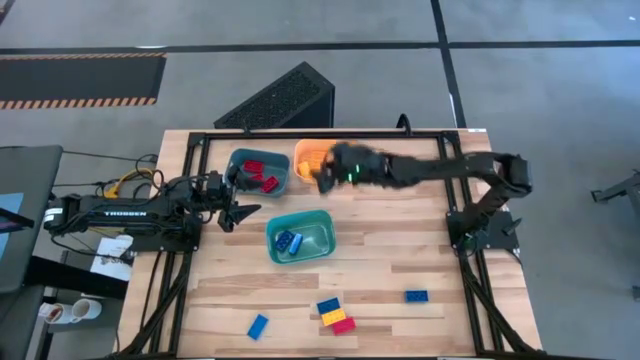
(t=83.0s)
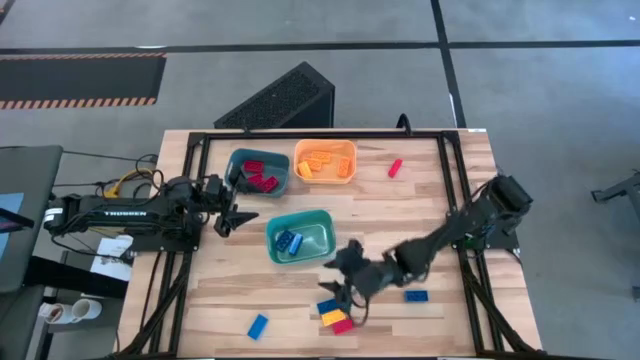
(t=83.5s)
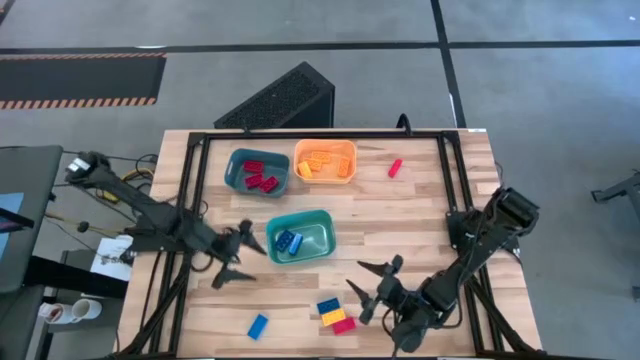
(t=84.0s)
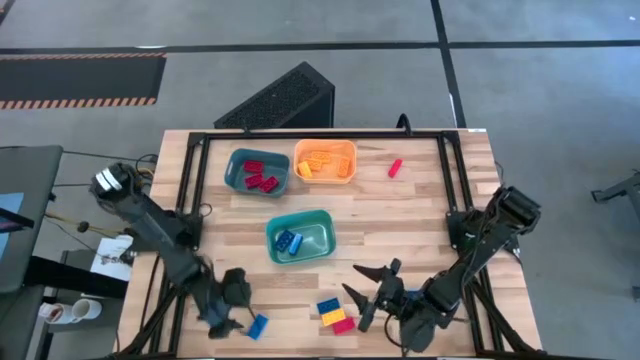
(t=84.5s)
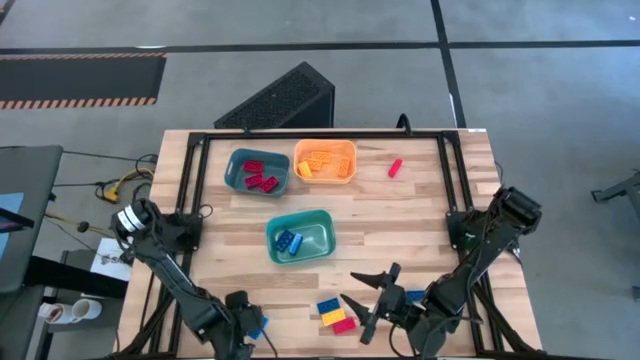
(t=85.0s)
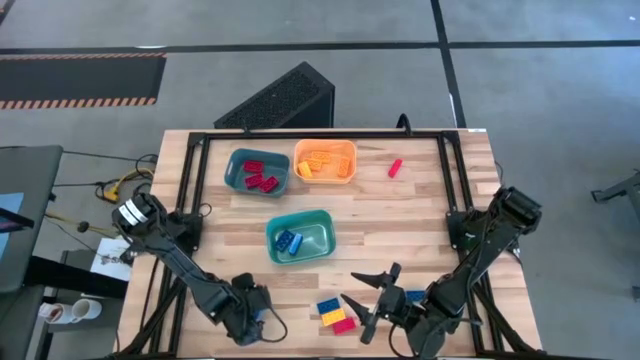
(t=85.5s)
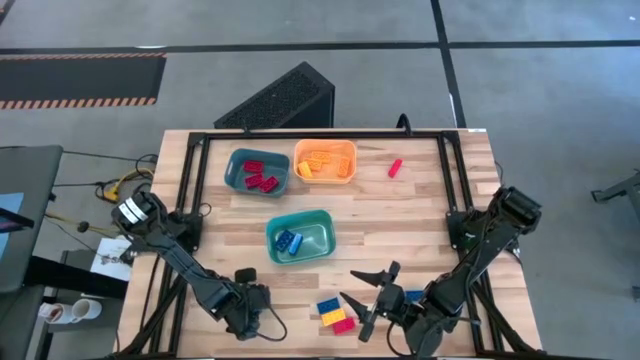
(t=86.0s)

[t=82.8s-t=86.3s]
Task: Sort & place blocks by color
Put the blue game piece into the green bin

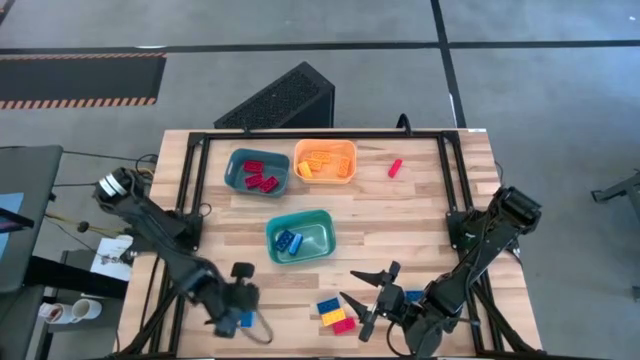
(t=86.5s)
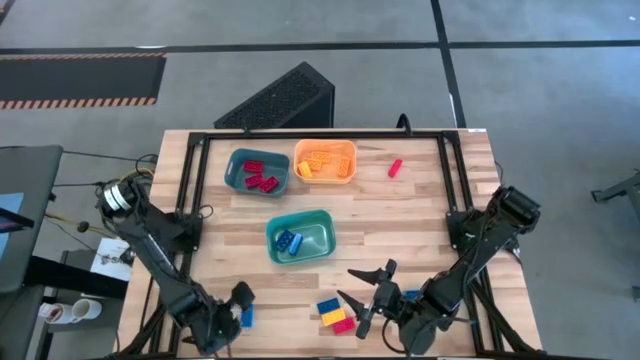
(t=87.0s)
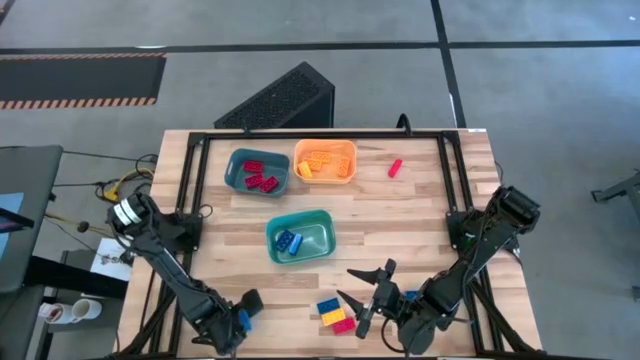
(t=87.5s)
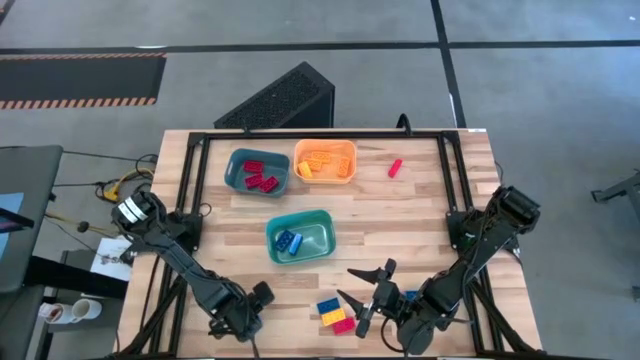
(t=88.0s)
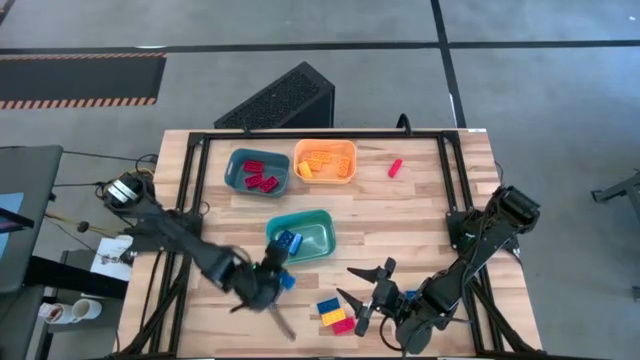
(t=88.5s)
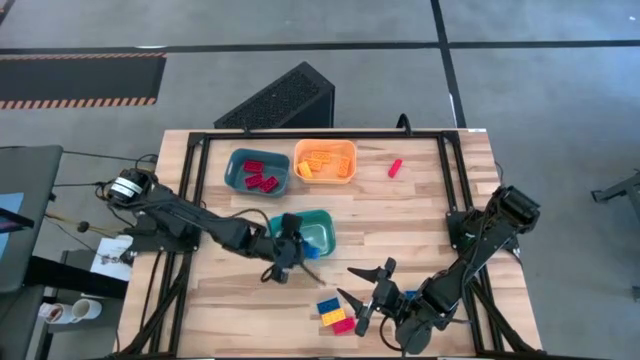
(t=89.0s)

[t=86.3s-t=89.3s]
Put the blue game piece into the green bin

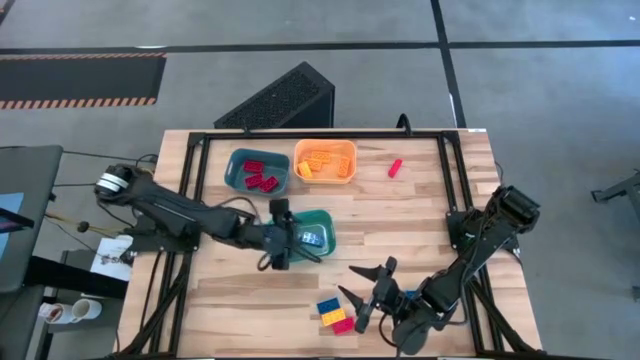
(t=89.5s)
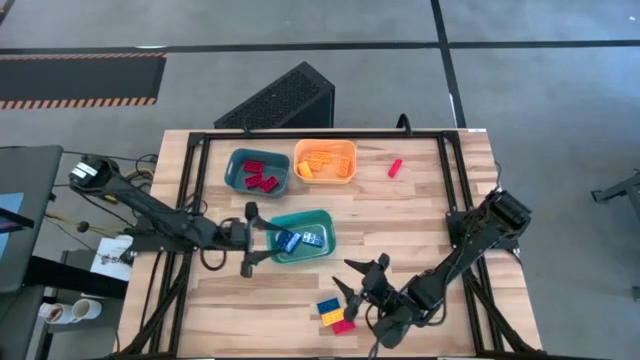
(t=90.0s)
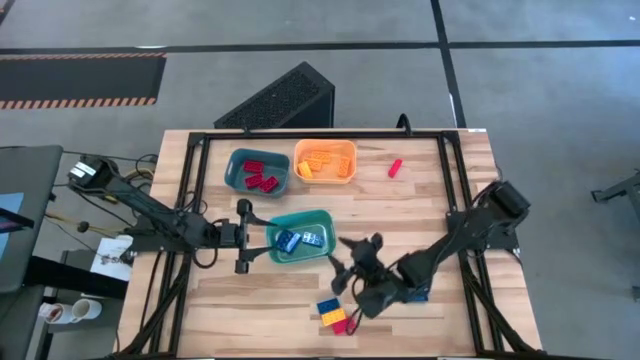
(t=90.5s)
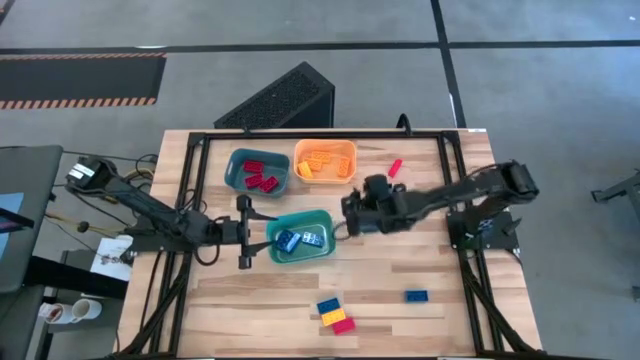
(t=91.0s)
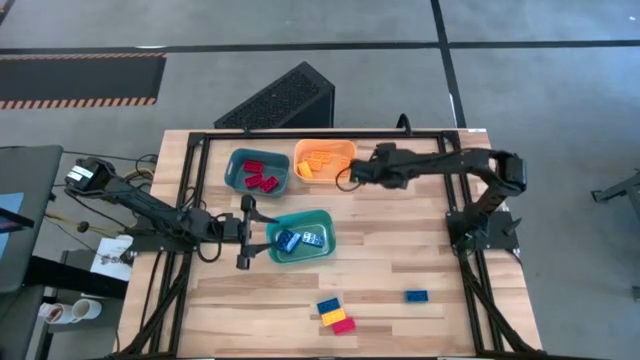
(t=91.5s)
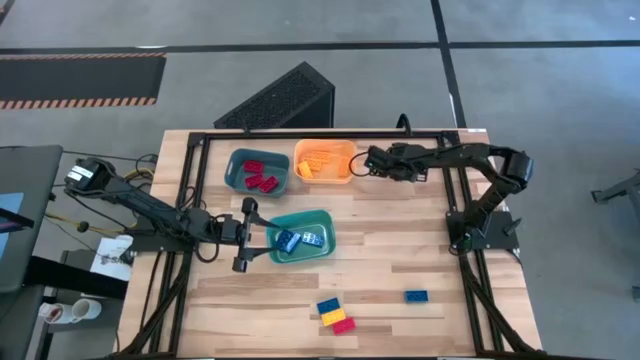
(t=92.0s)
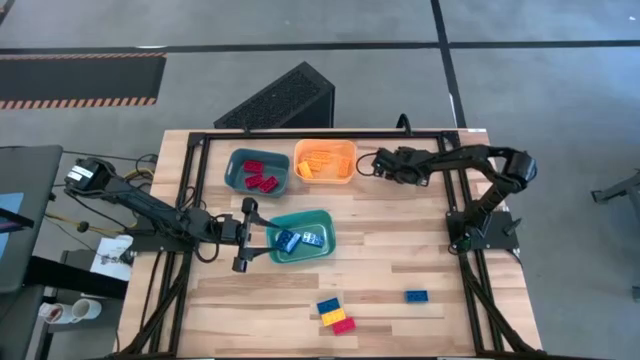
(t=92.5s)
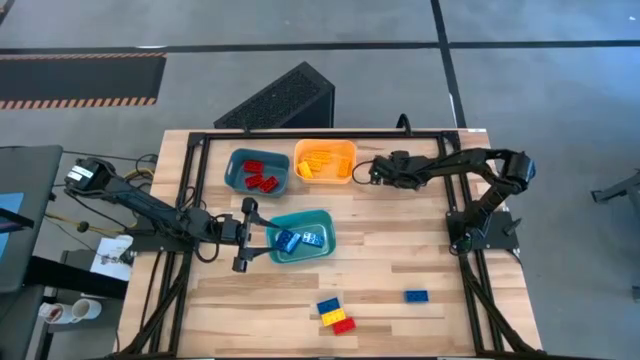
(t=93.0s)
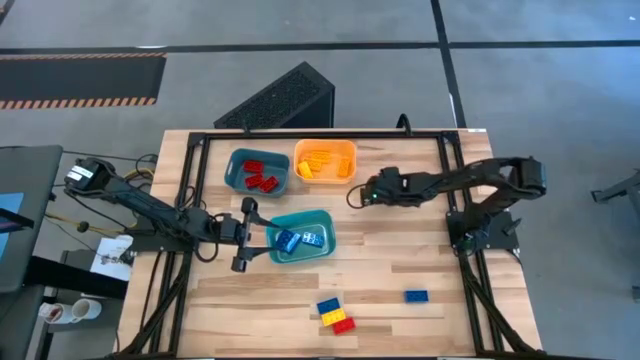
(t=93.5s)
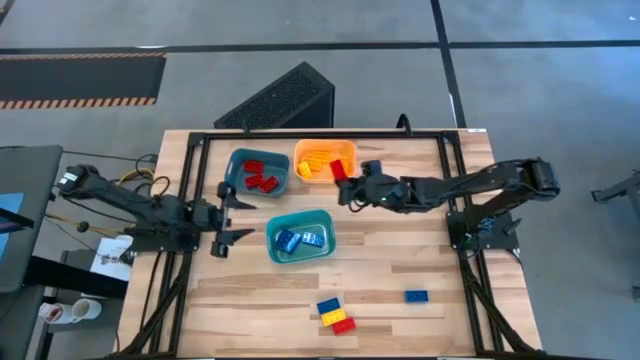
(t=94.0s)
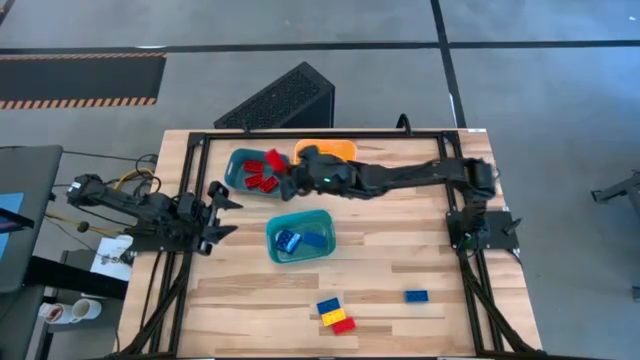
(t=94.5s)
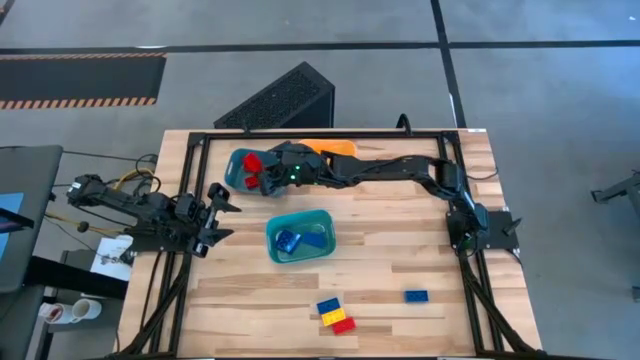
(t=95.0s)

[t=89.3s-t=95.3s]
Put the red game piece into the blue bin

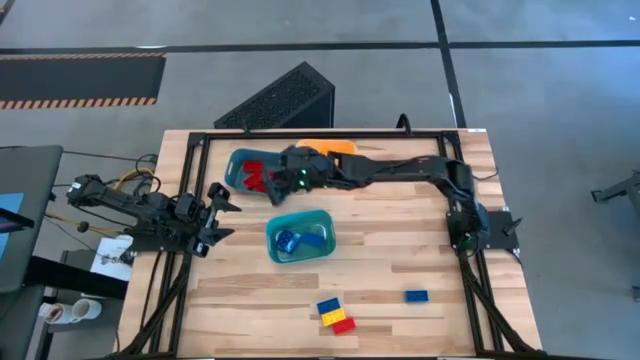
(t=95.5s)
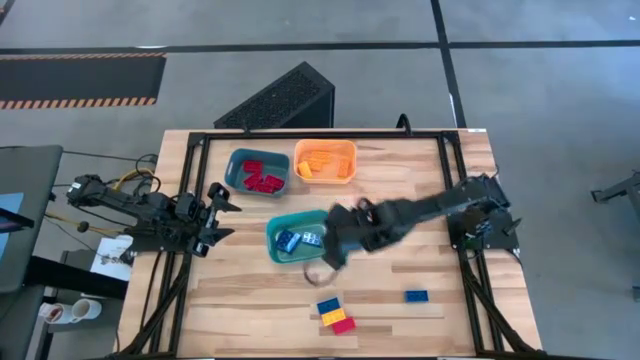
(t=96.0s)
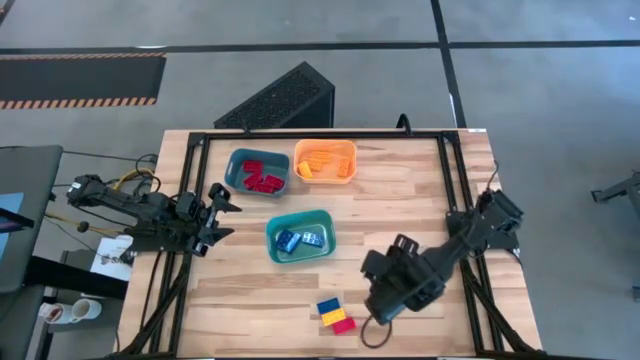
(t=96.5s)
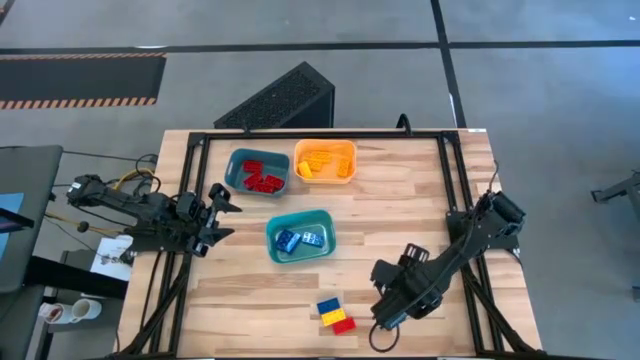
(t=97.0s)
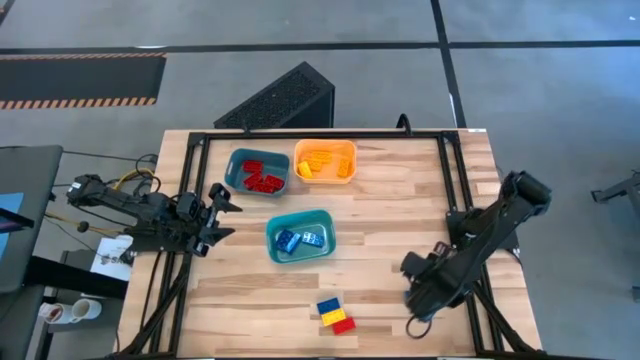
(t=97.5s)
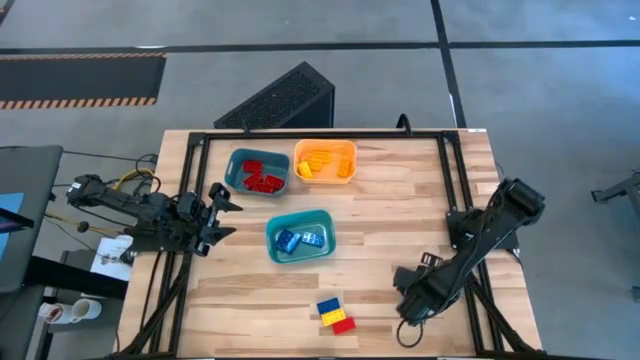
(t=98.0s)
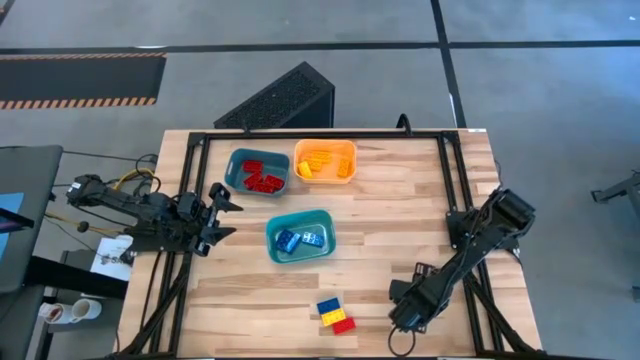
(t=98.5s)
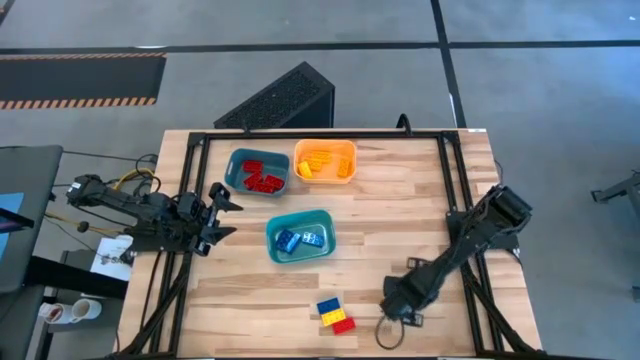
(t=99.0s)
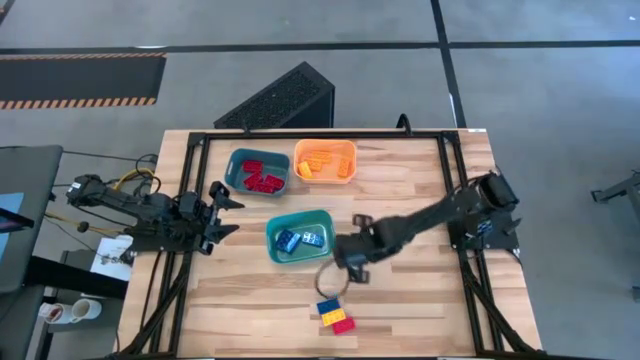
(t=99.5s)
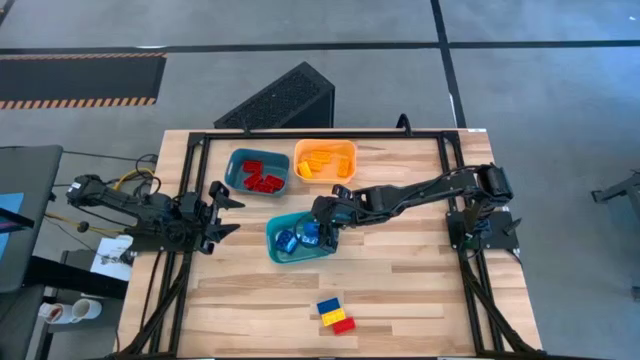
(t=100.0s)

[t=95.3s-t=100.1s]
Put the blue game piece into the green bin

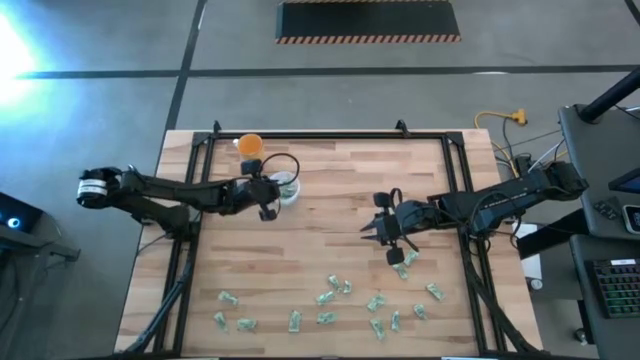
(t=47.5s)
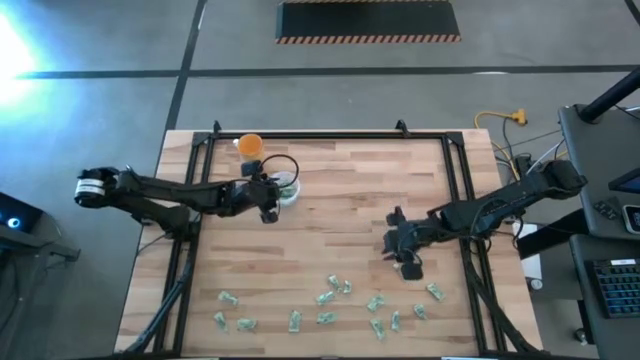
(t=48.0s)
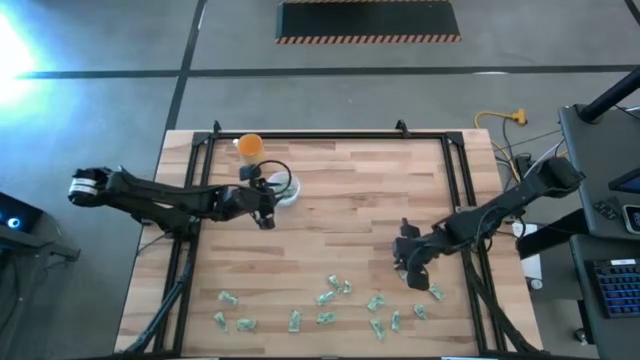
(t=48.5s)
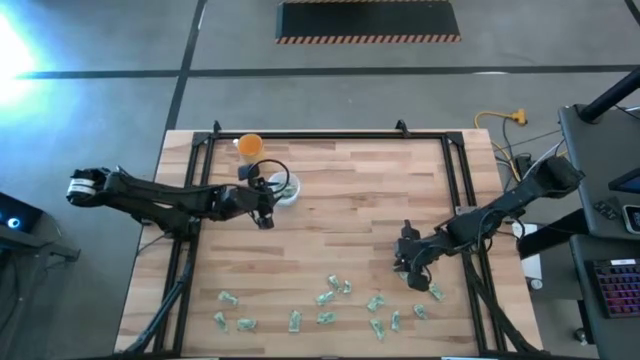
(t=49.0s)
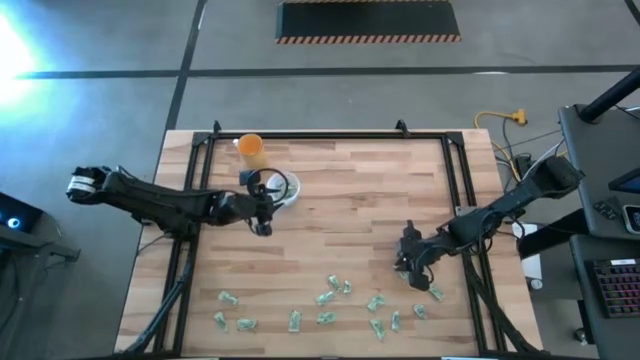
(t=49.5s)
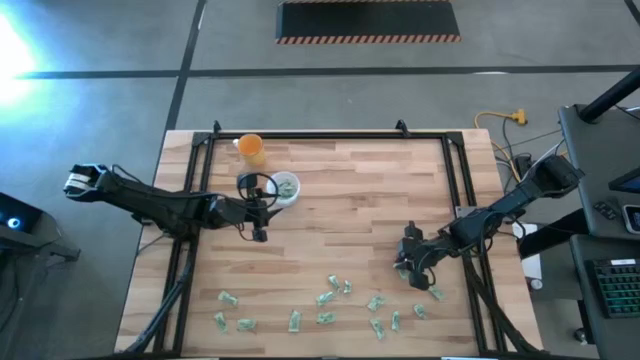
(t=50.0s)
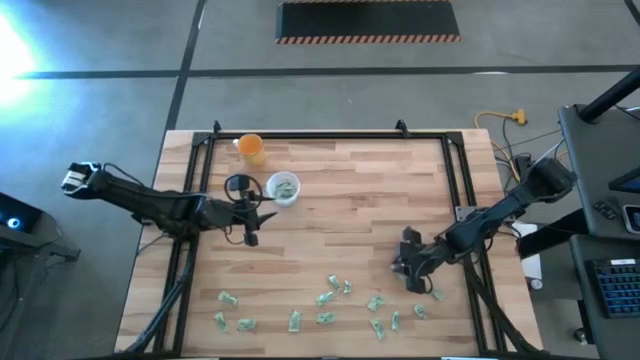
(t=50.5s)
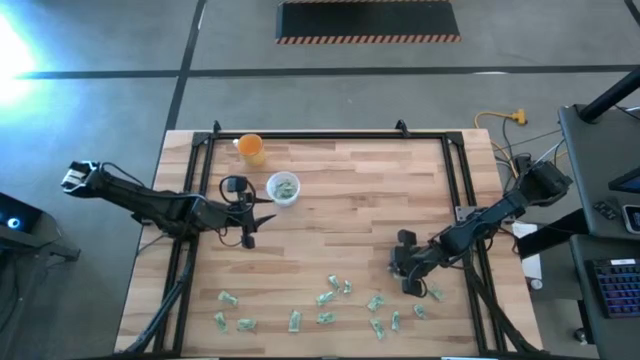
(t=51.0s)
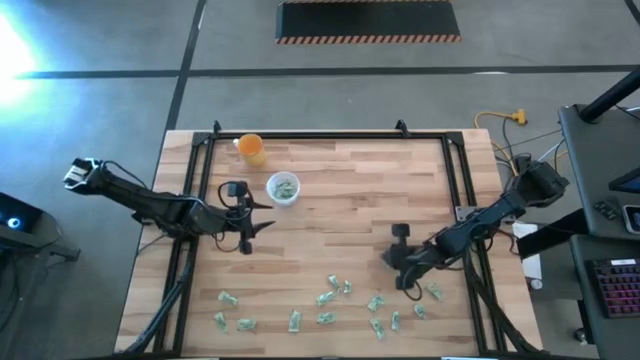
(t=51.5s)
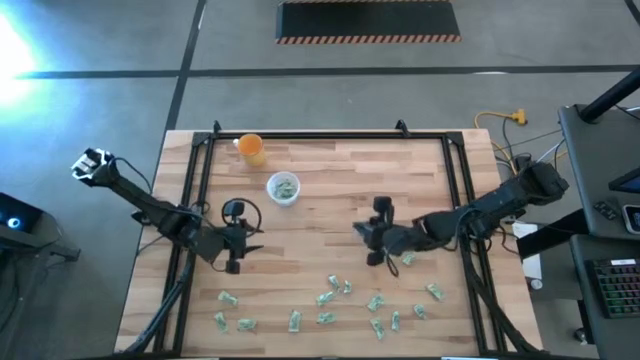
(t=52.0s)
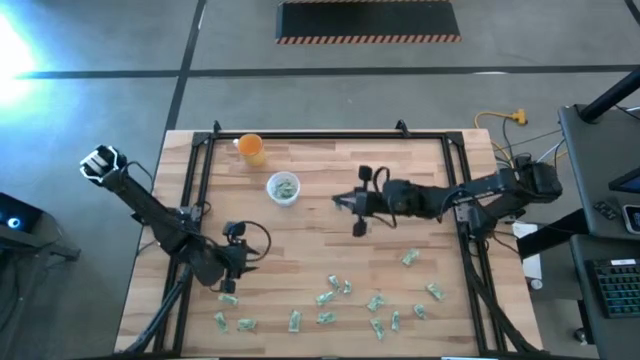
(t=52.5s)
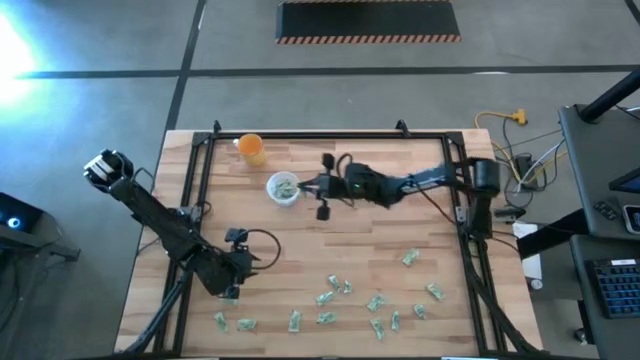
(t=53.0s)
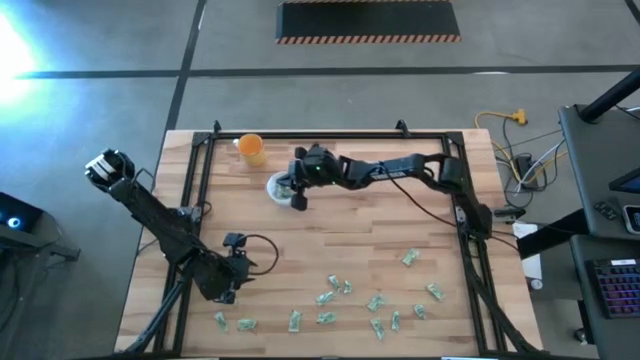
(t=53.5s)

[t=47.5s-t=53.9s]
Task: Pick and place Stevia / Truvia into bins
Put the stevia packet into the transparent container
